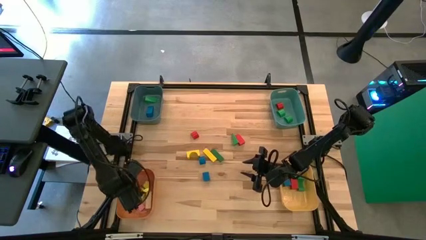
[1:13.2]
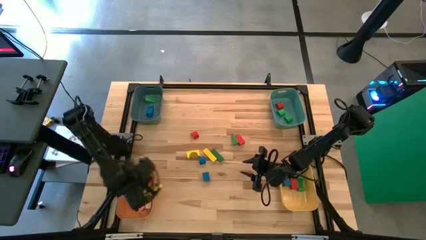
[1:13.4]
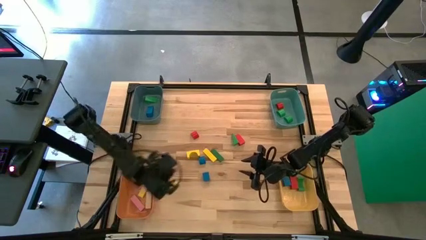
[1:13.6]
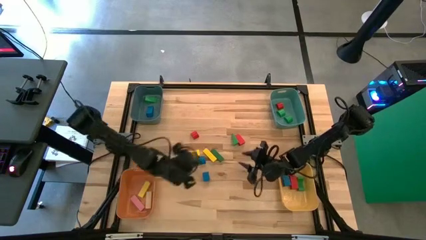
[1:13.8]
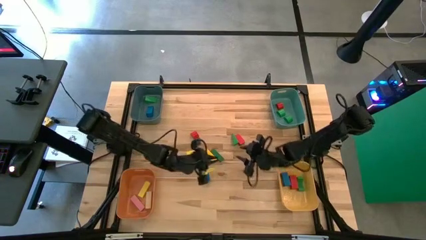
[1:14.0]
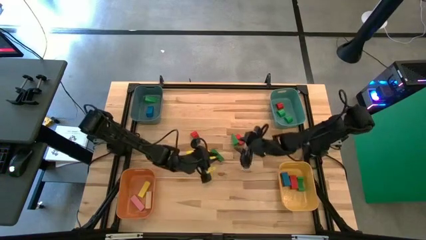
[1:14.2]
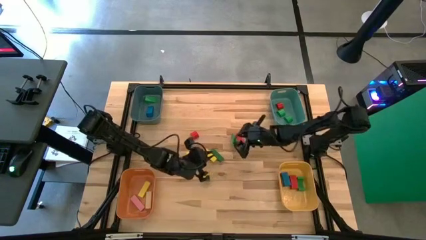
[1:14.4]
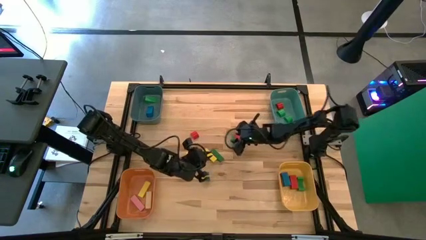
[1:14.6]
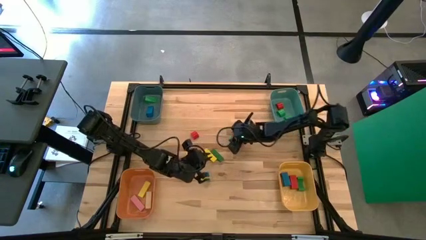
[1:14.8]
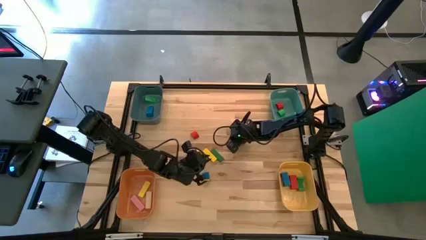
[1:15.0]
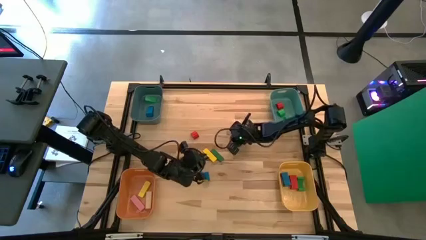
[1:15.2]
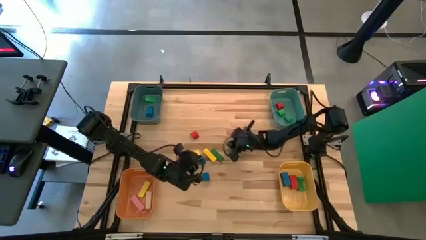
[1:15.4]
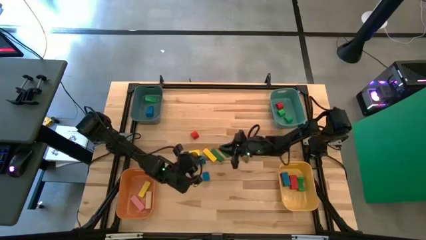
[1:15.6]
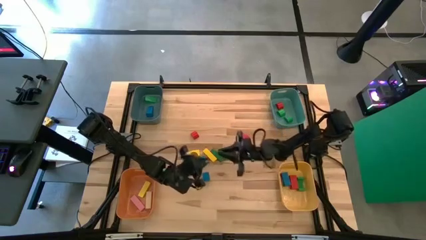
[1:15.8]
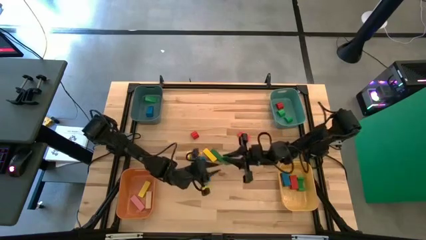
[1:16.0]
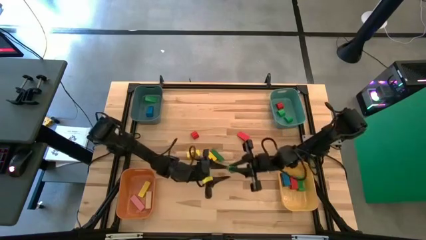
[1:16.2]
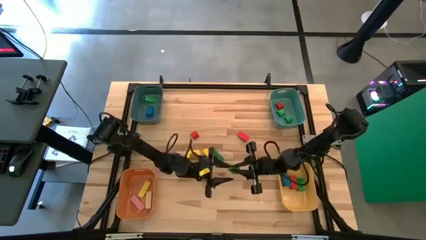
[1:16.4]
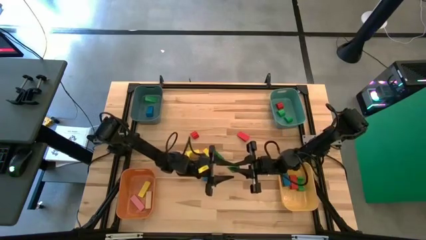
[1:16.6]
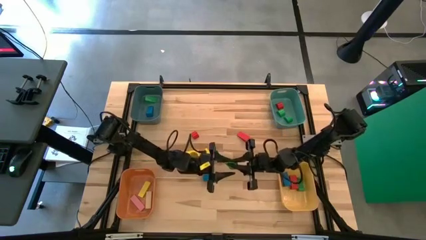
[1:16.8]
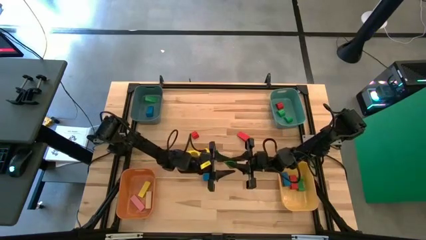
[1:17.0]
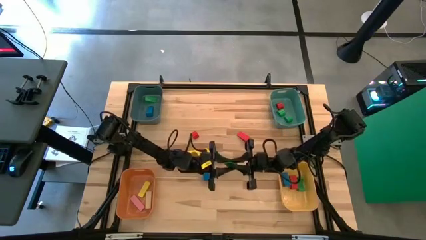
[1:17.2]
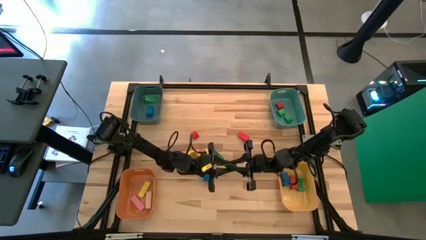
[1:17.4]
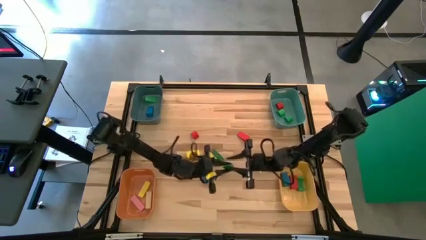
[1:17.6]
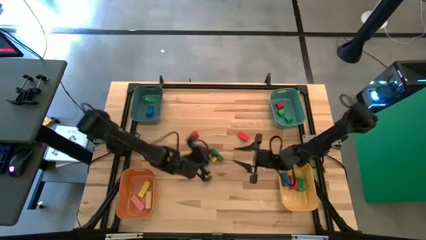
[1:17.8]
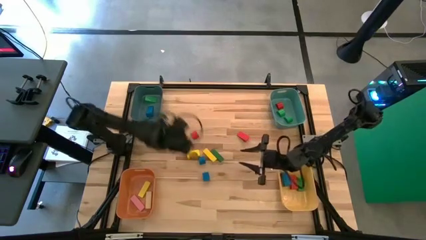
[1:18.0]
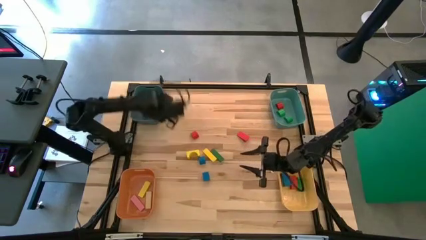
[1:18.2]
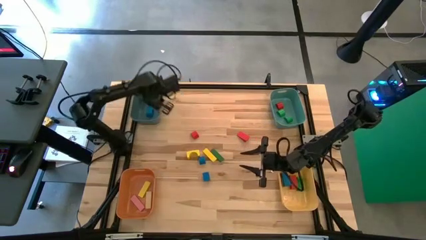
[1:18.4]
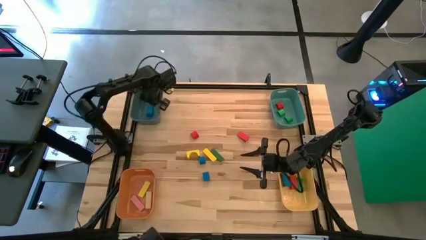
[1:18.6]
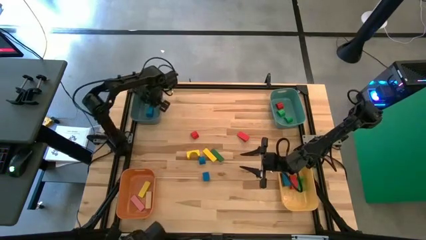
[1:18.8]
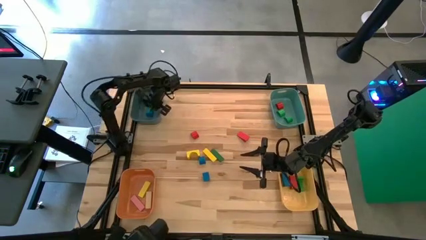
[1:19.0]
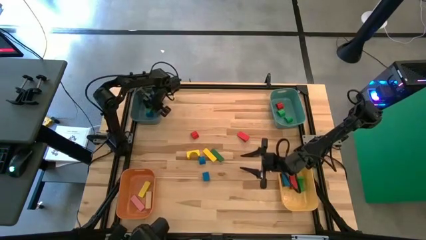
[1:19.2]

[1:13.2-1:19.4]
Task: Sort blocks by size
Put the green triangular block into the blue bin

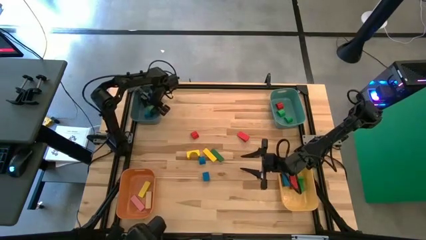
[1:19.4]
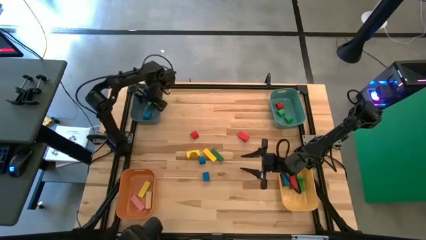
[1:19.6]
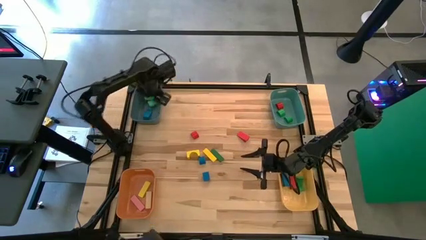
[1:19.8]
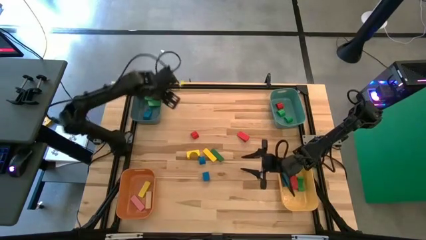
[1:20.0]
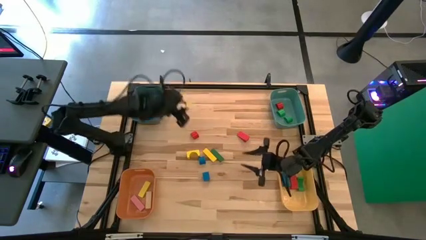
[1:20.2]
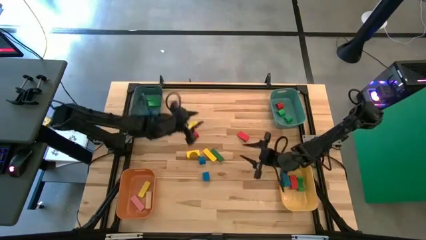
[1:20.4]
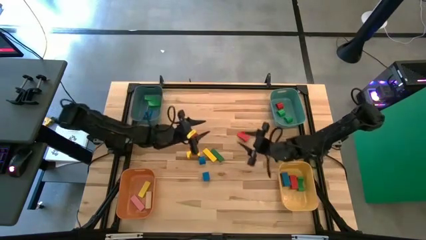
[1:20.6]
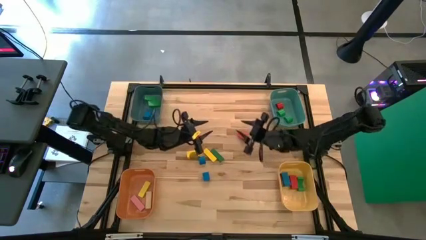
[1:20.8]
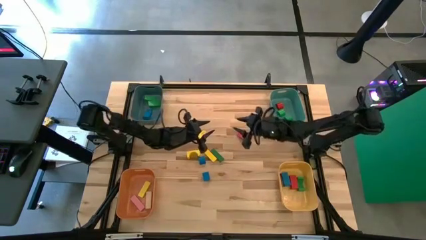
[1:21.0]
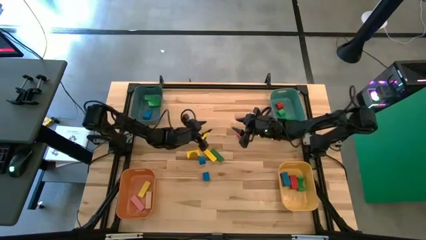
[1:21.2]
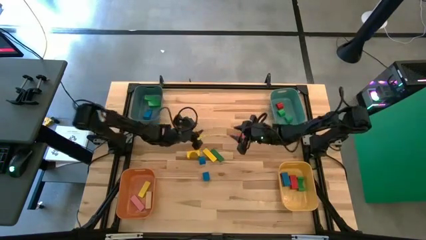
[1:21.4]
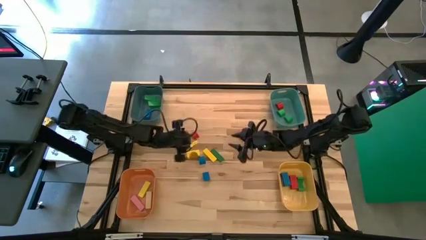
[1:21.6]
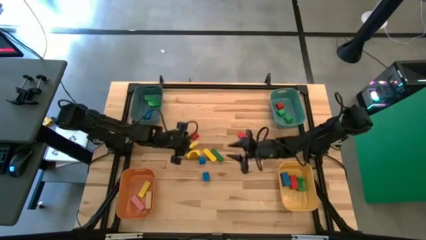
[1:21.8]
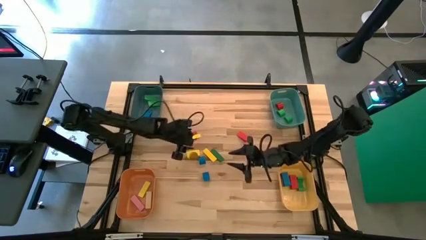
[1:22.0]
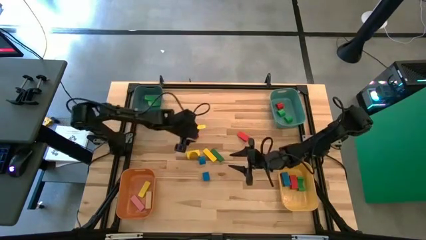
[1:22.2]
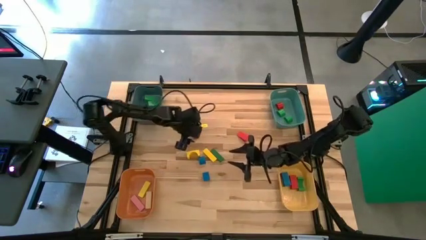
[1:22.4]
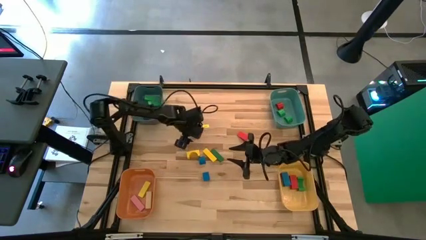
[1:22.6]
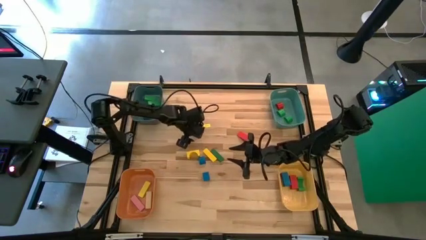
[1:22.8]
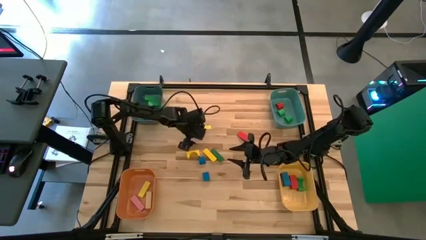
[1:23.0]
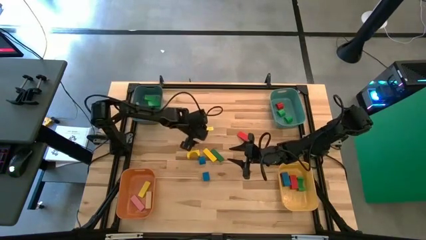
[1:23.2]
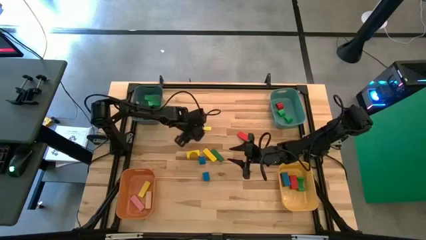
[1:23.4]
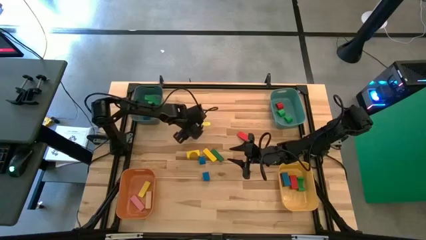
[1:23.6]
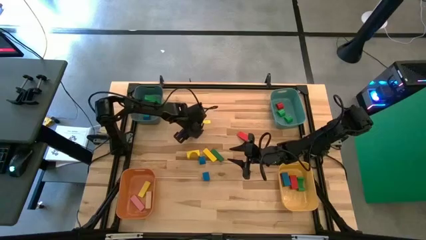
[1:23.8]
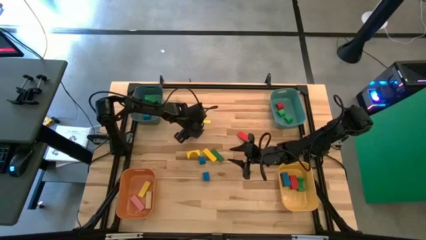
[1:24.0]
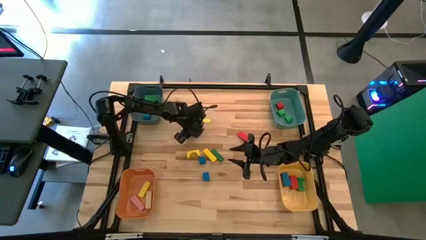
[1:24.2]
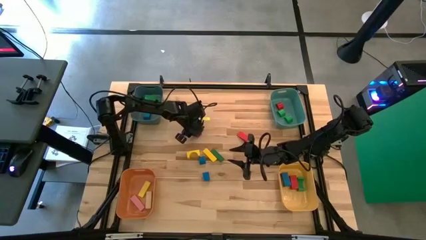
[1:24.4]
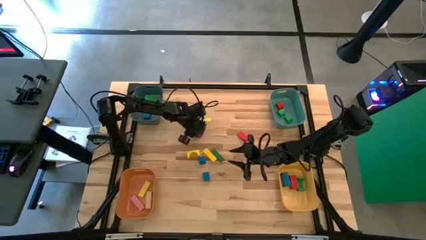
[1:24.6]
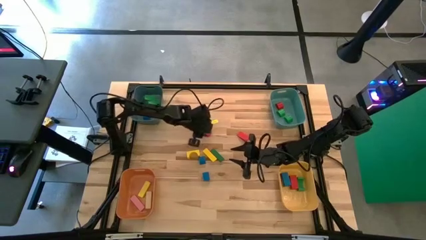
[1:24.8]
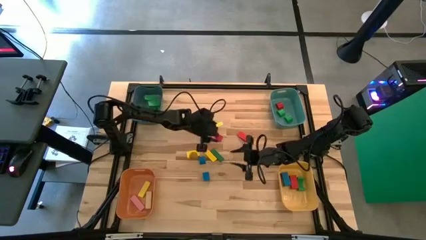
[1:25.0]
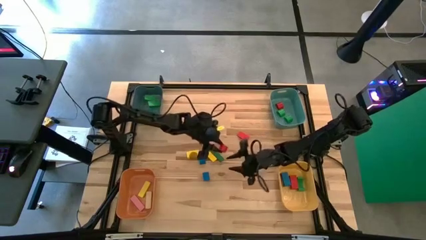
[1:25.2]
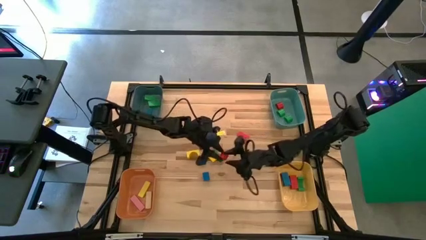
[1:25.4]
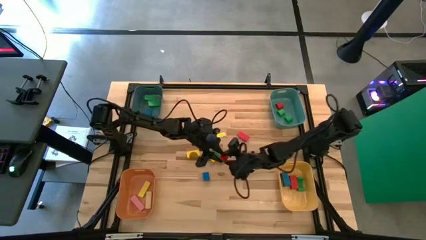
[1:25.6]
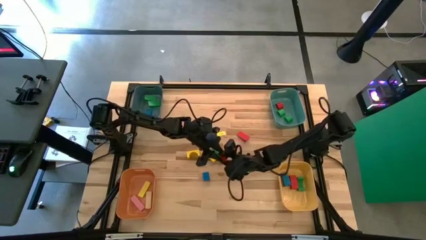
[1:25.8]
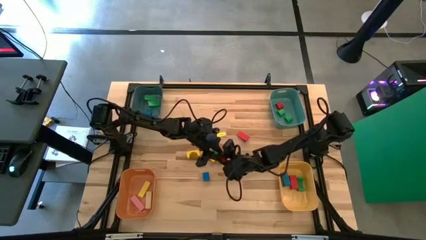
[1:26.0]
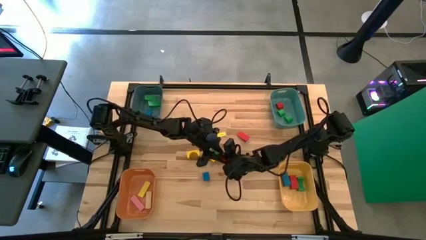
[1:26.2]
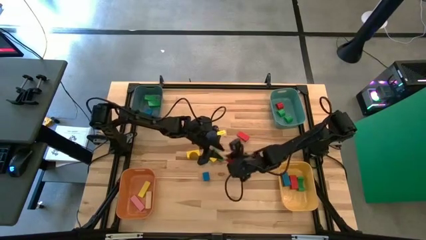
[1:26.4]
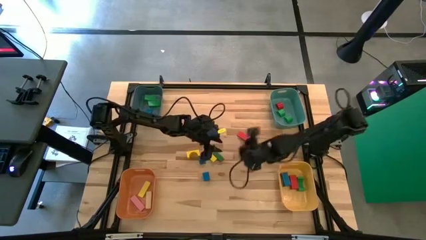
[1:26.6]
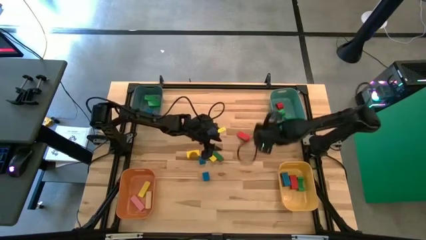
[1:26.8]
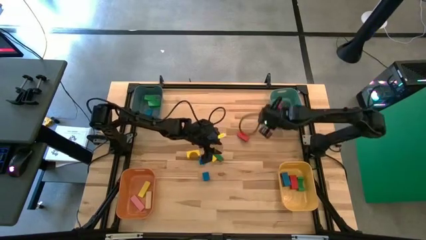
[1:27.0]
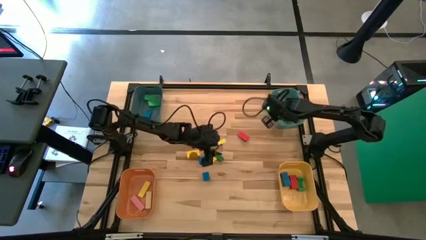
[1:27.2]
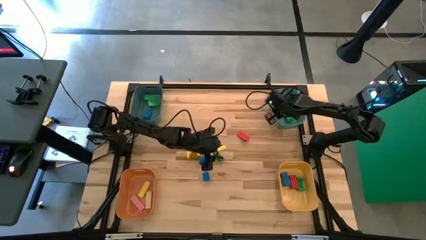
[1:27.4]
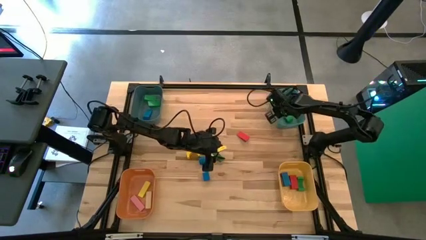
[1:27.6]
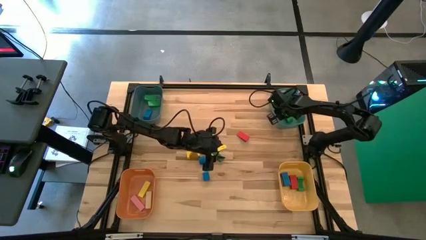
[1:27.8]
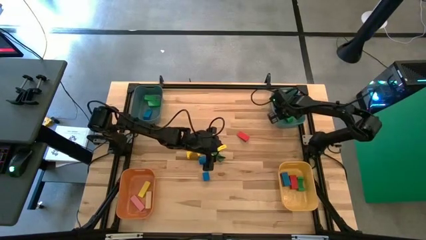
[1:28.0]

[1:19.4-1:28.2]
Put the red semicircle block into the green bin

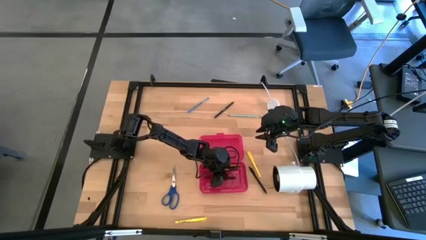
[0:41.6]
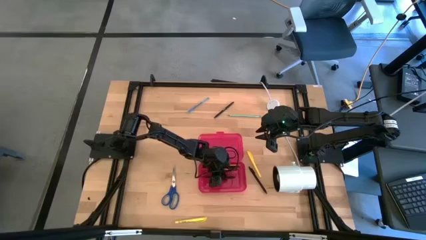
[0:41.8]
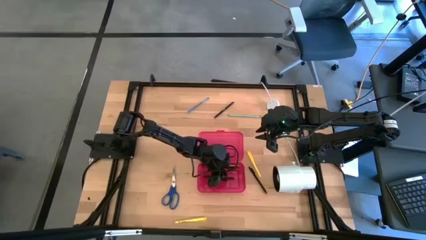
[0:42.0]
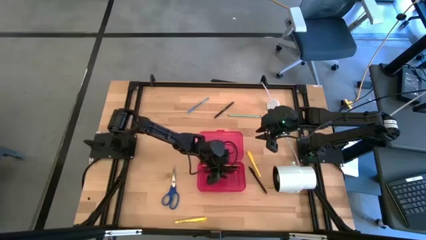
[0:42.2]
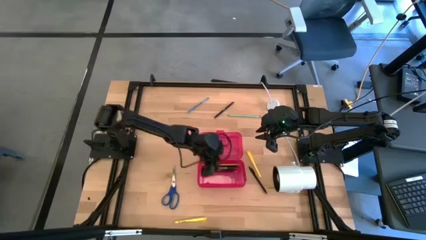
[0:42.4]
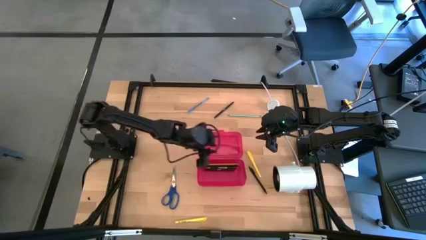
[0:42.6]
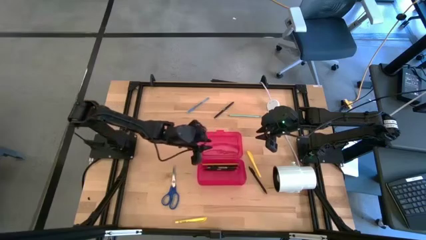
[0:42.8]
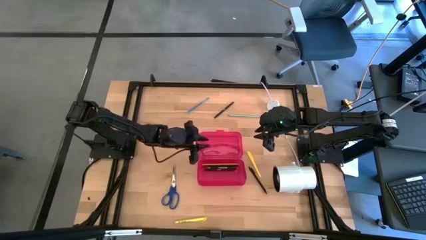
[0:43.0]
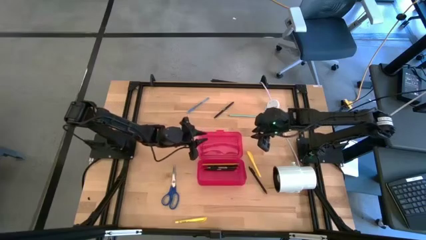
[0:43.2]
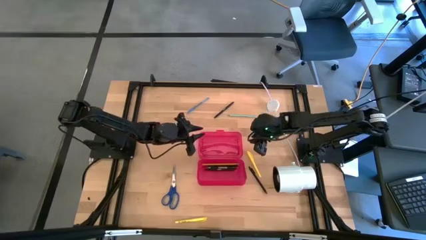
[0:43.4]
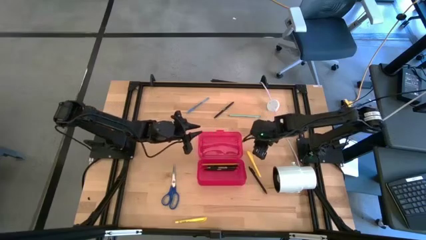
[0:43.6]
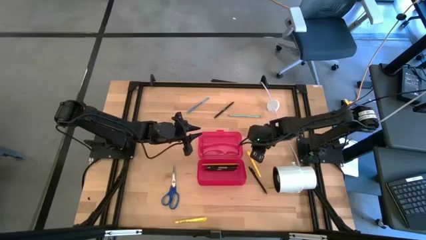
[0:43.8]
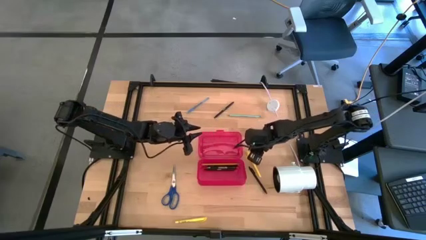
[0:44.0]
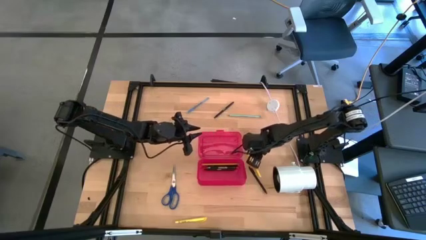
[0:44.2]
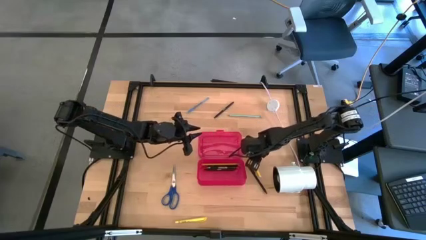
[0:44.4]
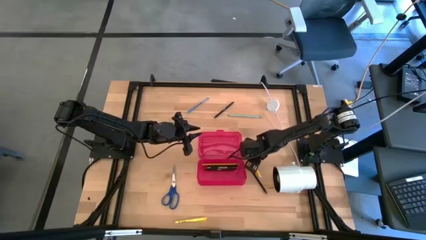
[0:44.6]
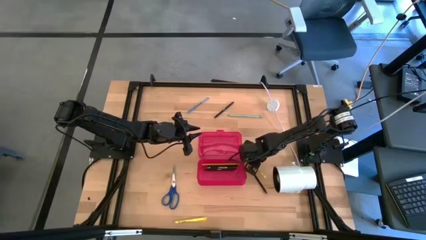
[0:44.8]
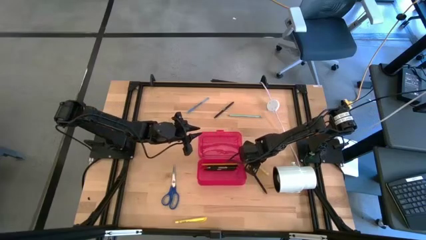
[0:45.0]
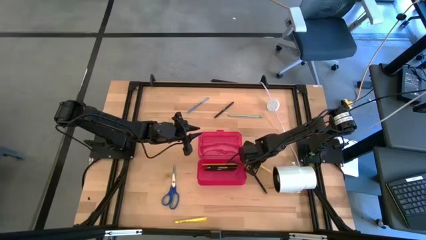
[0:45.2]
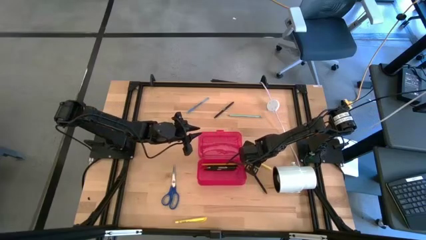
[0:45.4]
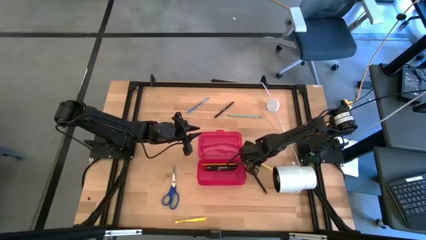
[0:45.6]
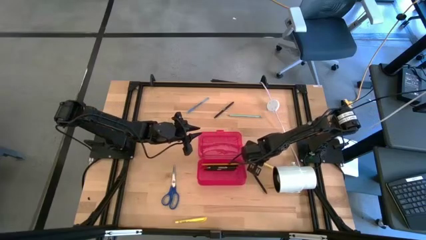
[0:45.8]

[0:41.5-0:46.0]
Task: Pick & place school supplies into a supply box
Put the top yellow pen into the red supply box
